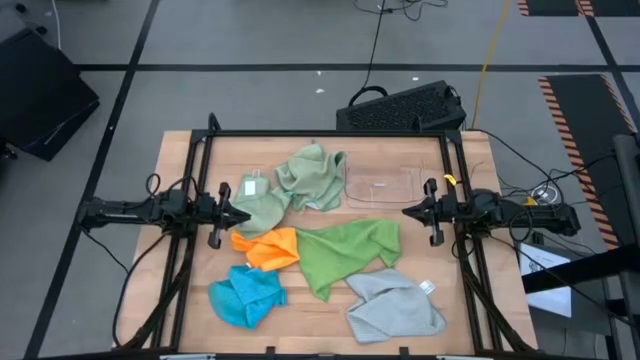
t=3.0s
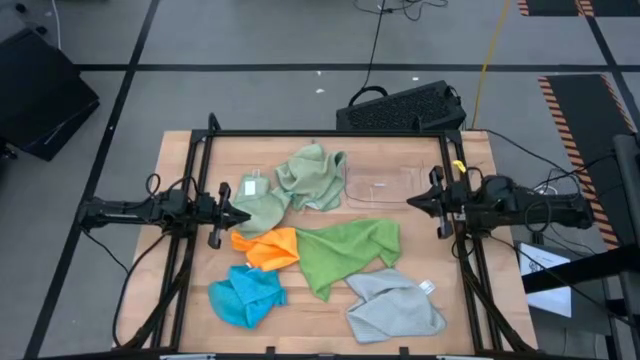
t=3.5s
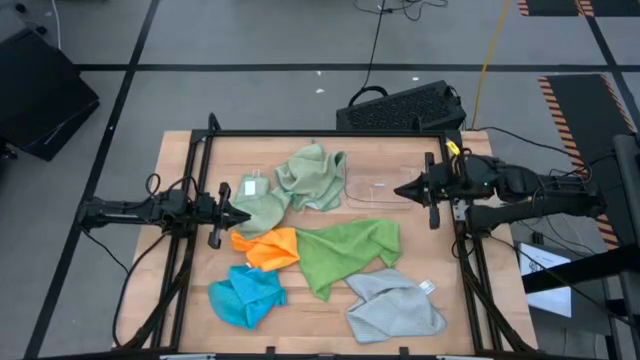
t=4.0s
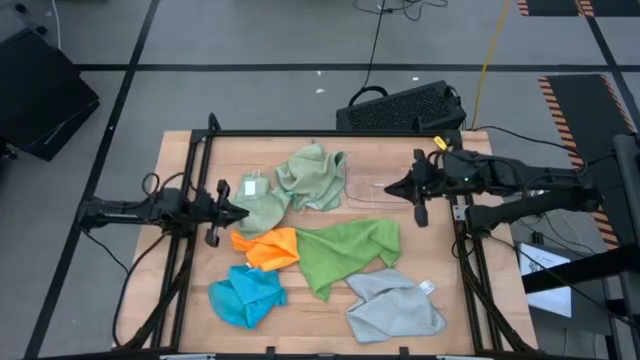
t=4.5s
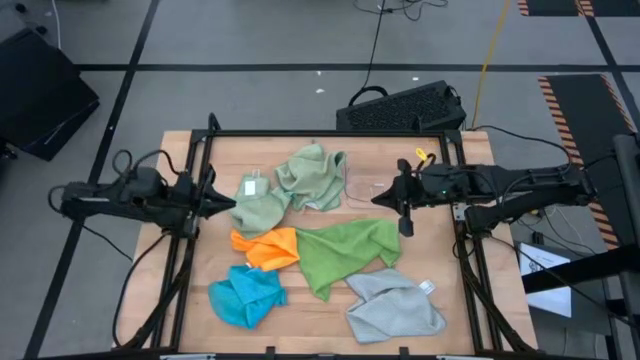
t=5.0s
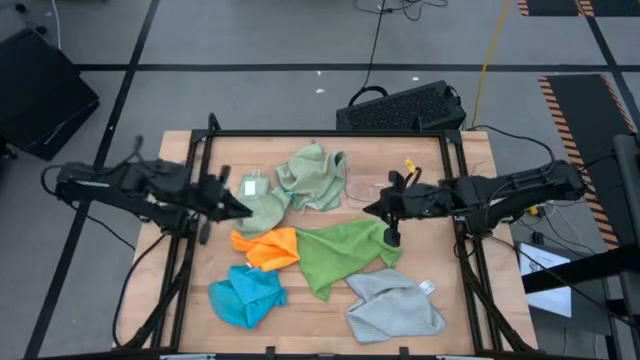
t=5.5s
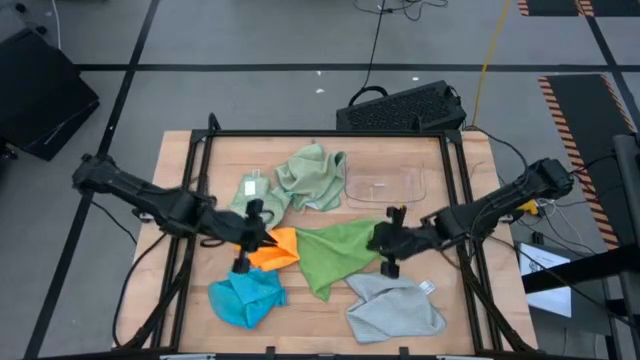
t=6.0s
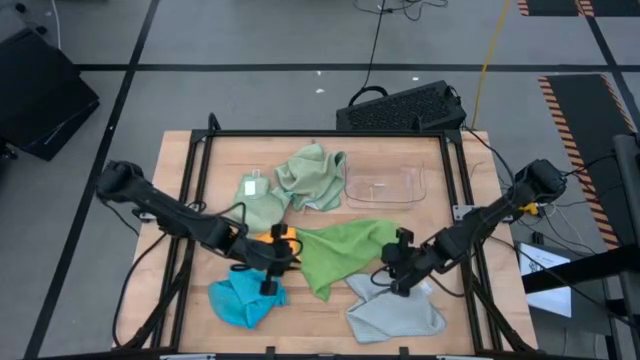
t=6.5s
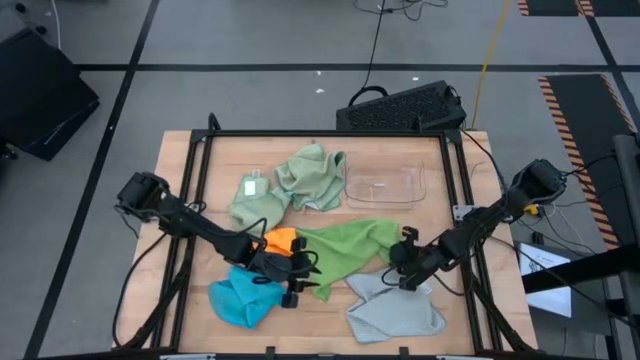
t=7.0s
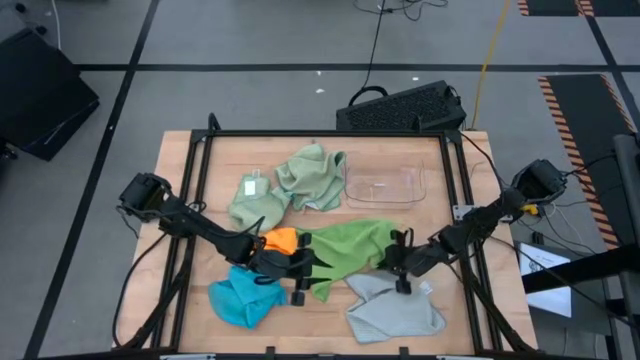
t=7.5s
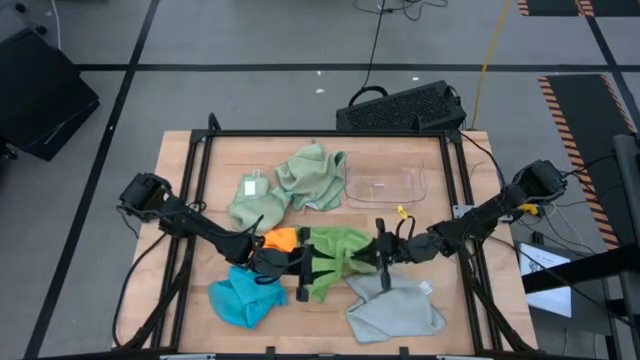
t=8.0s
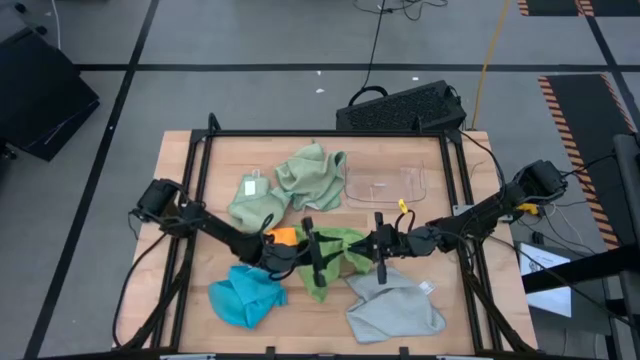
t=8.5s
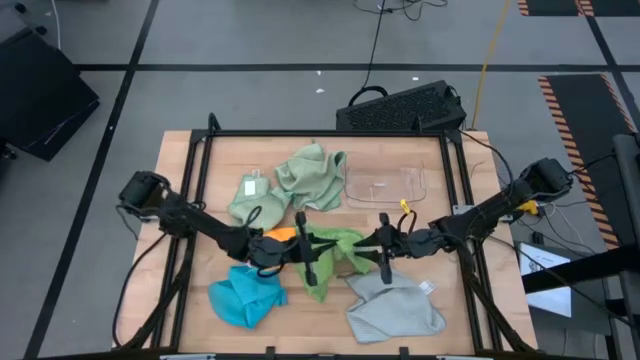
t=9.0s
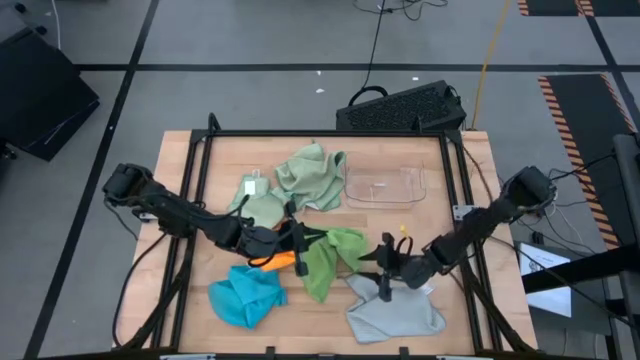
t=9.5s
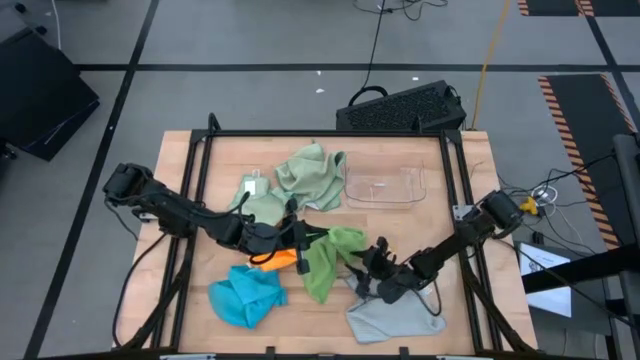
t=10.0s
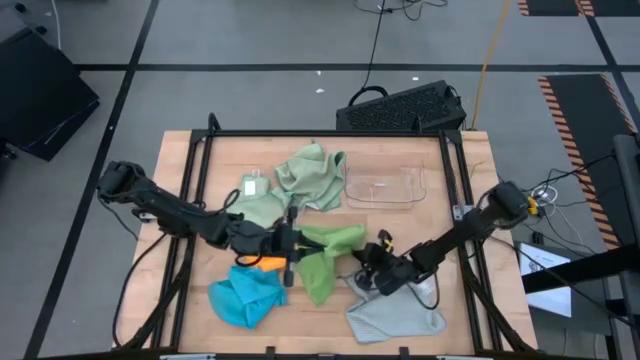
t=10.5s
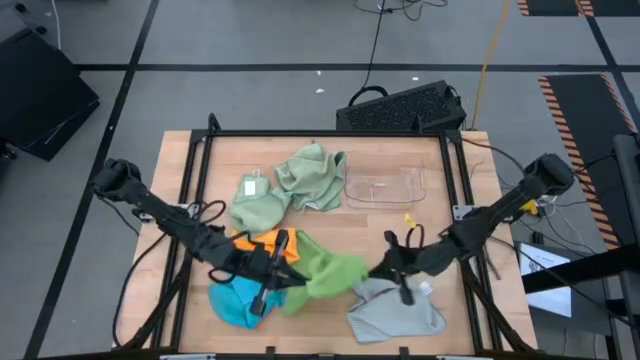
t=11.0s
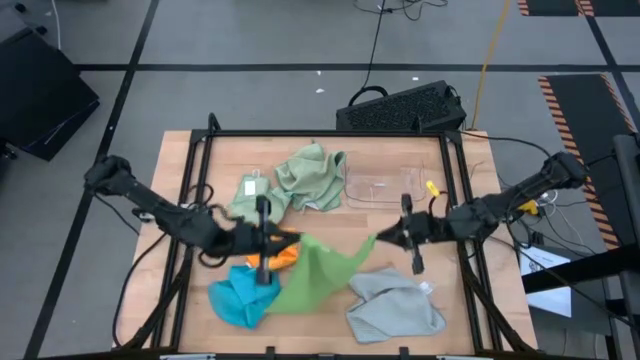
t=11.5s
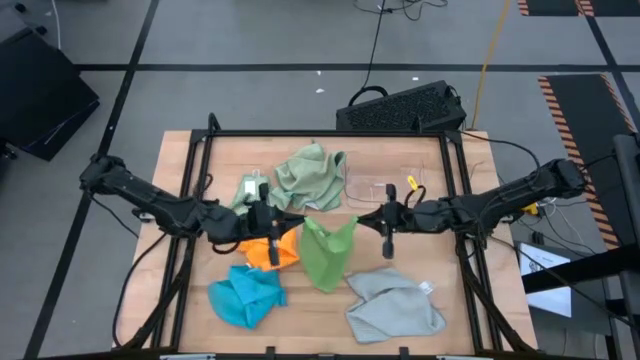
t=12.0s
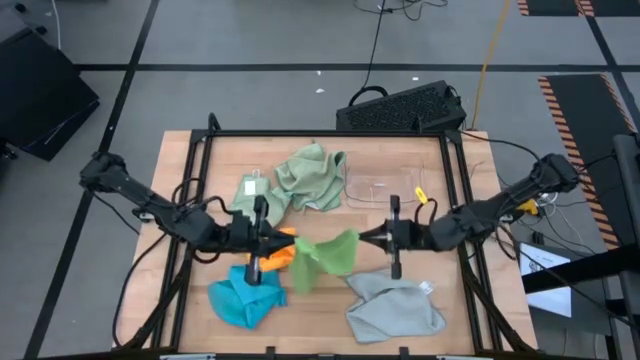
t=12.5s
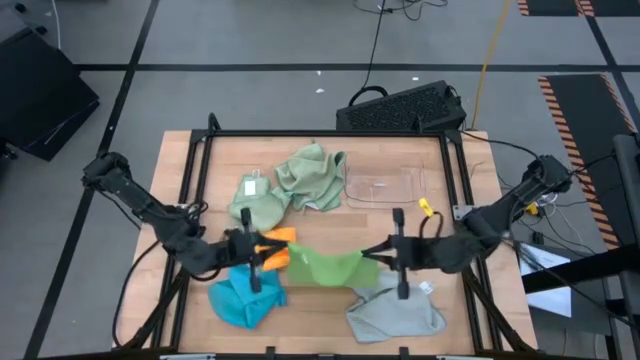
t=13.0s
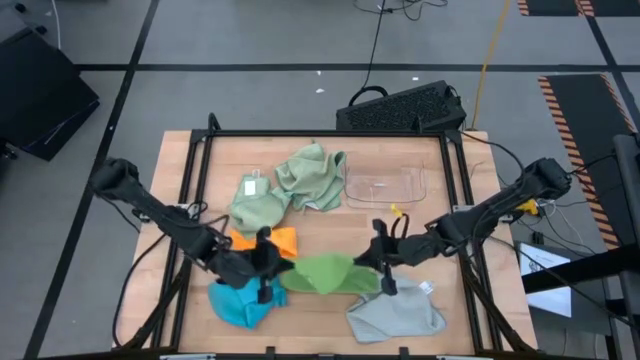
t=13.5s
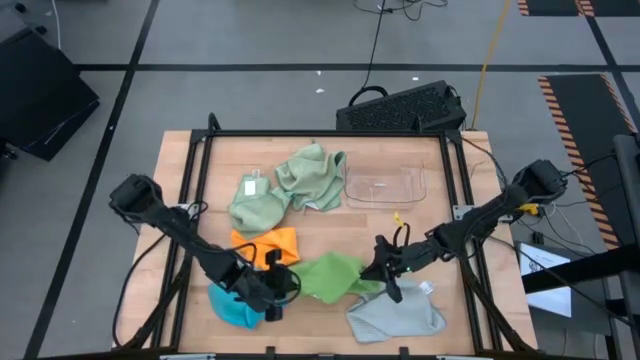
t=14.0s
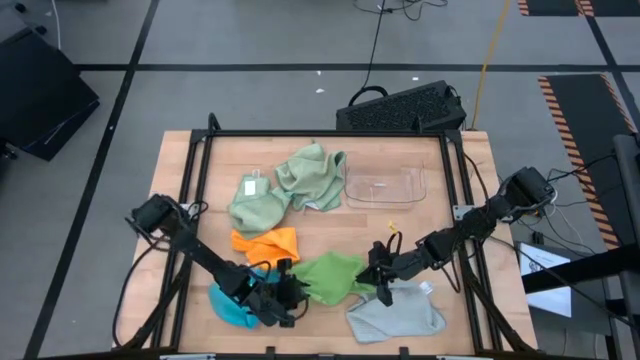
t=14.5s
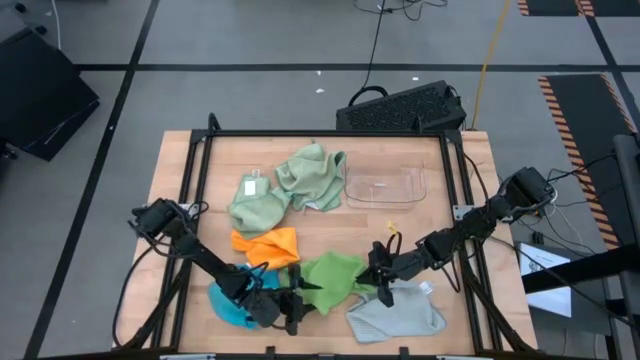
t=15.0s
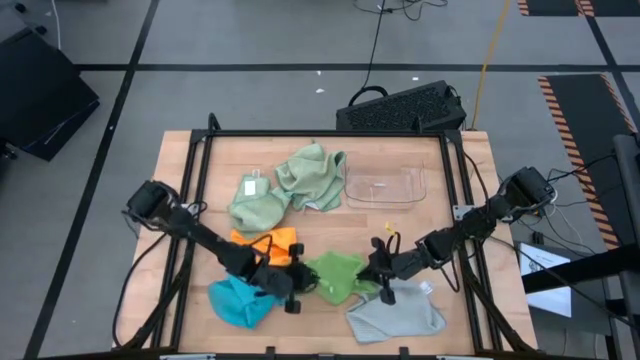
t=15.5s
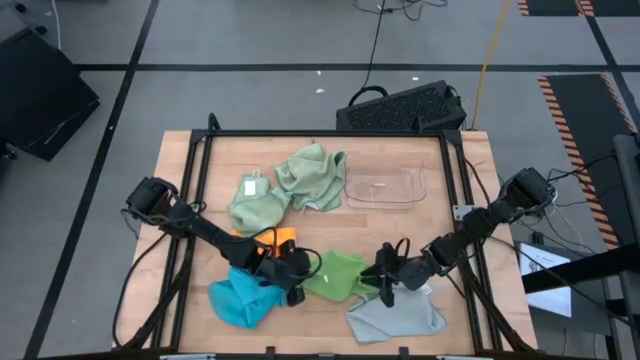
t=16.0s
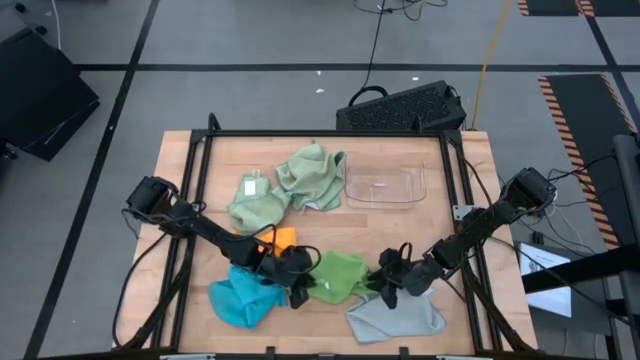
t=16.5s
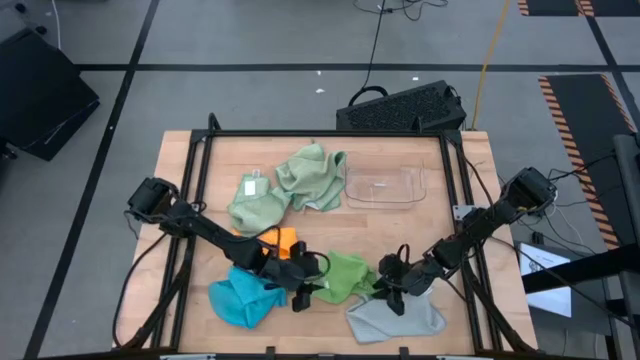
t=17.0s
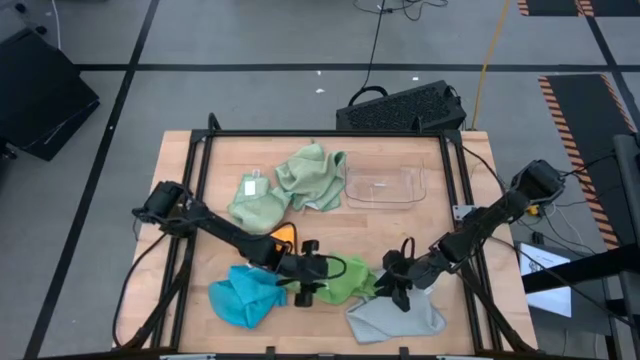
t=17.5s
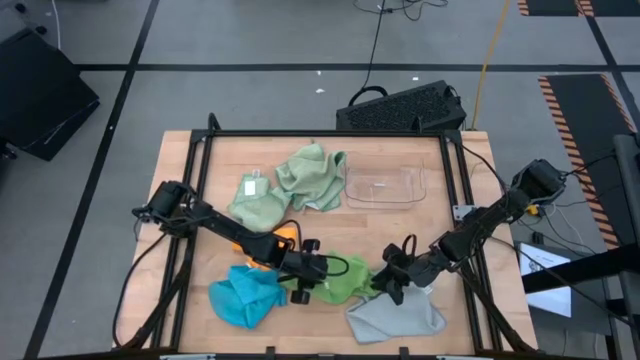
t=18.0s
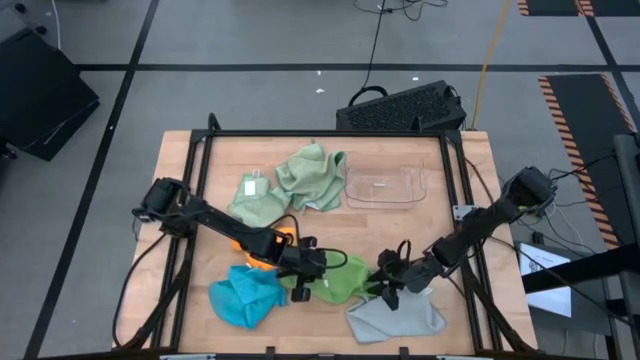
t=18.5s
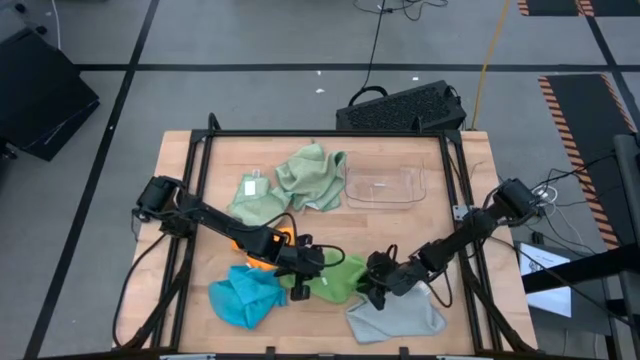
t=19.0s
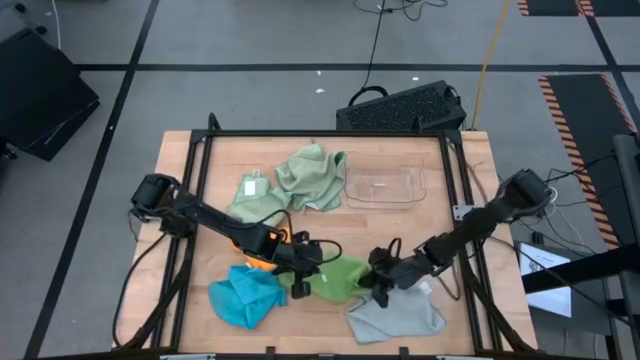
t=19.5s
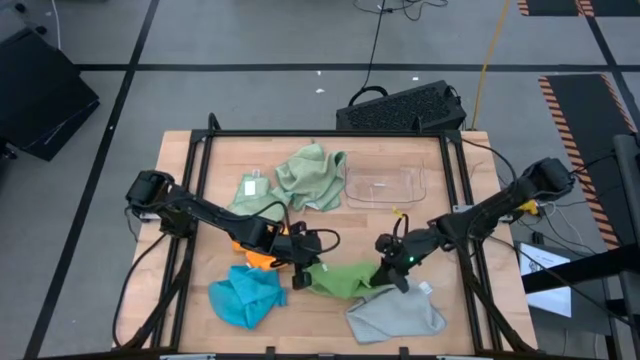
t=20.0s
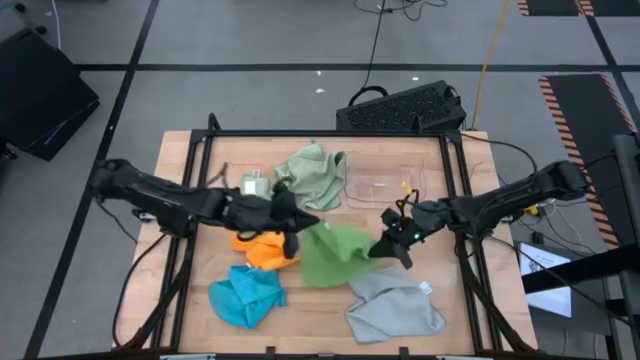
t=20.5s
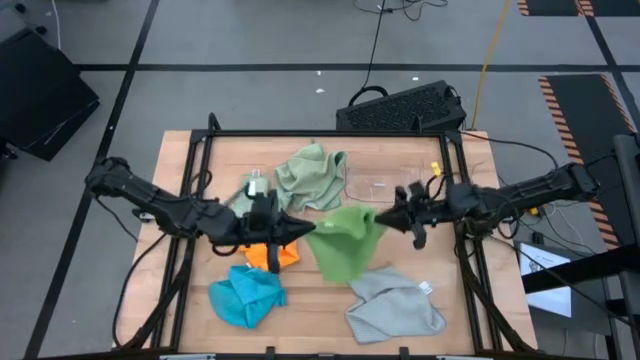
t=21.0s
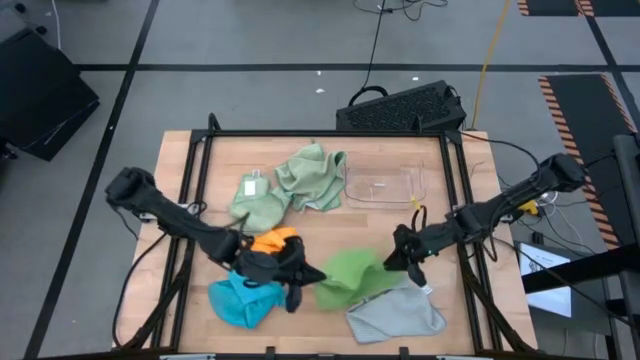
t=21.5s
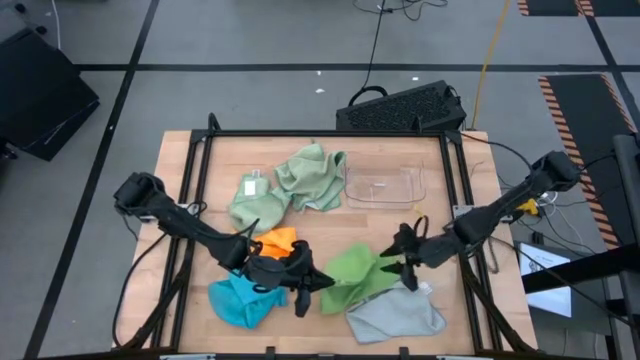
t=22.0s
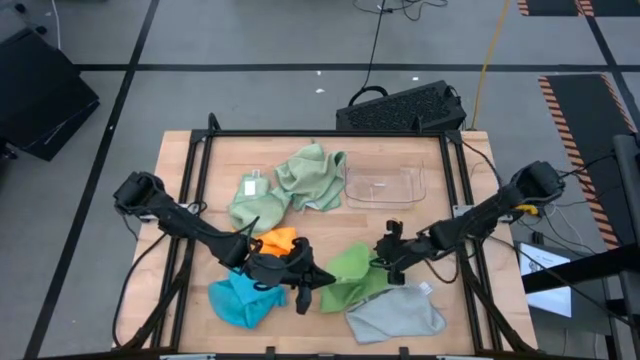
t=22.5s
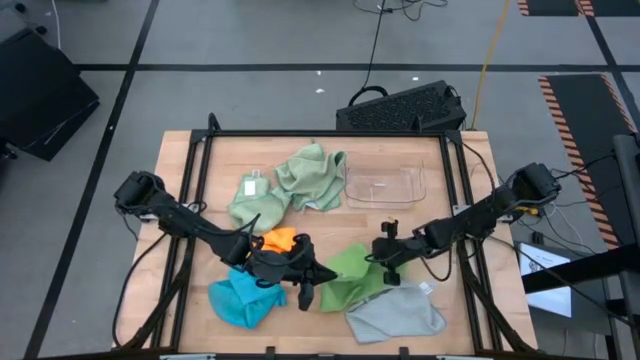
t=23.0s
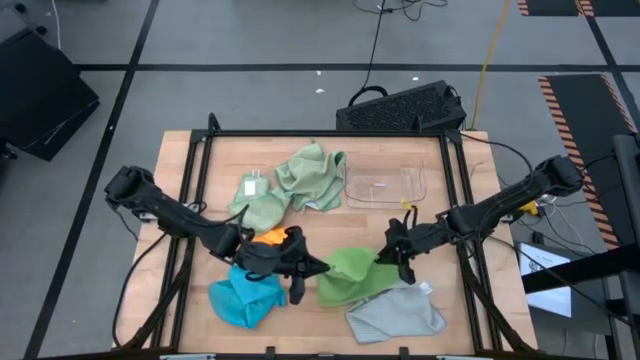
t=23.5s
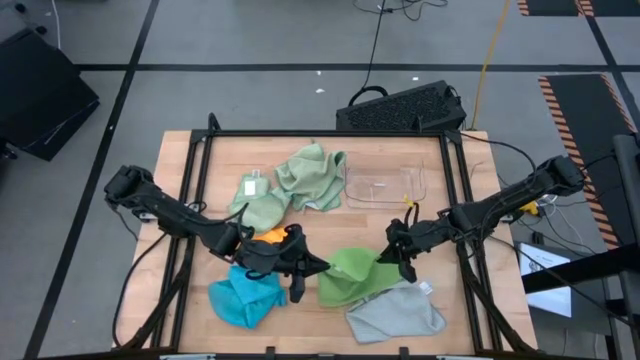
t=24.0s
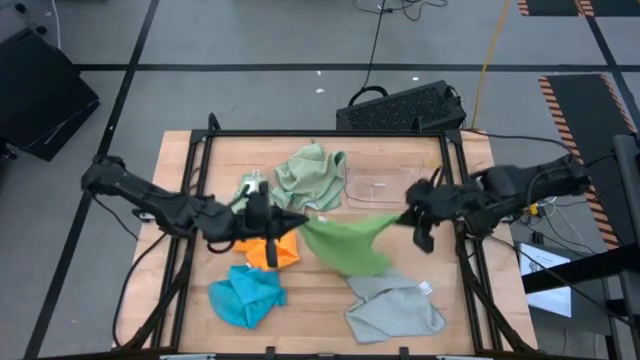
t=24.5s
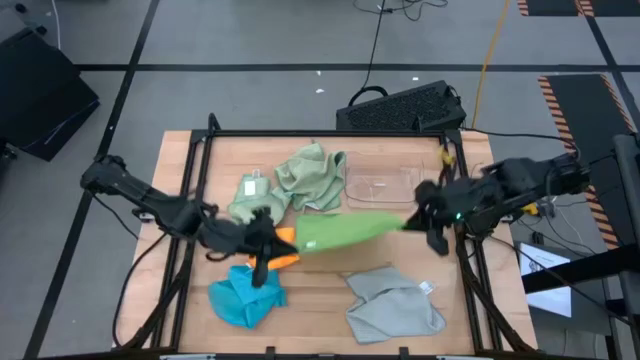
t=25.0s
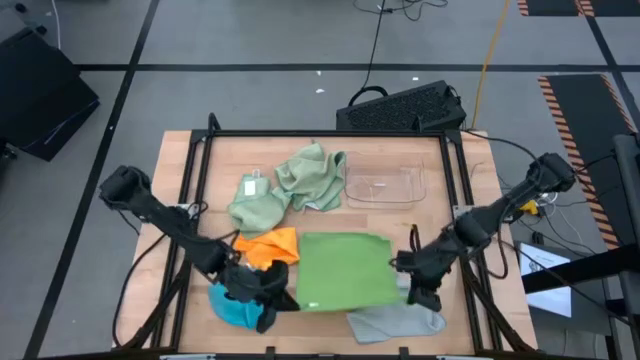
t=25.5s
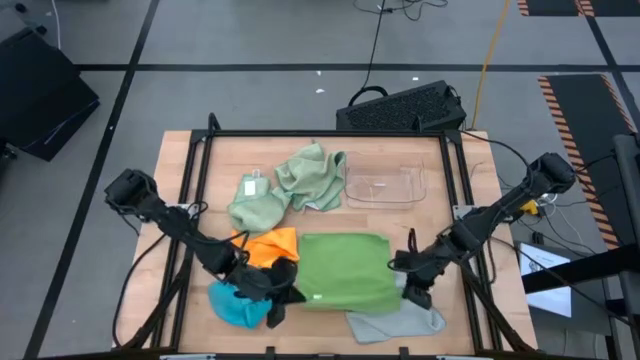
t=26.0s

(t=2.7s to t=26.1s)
Task: Fold microfiber towels
Fold the green microfiber cloth
